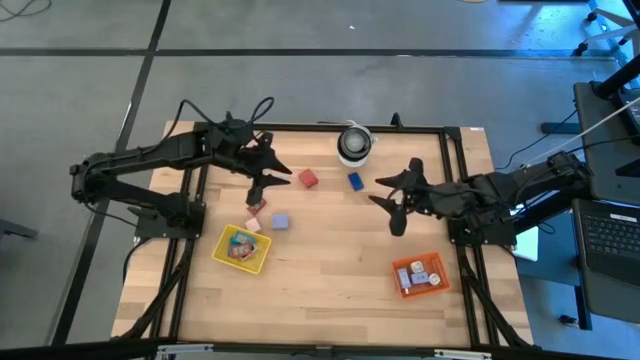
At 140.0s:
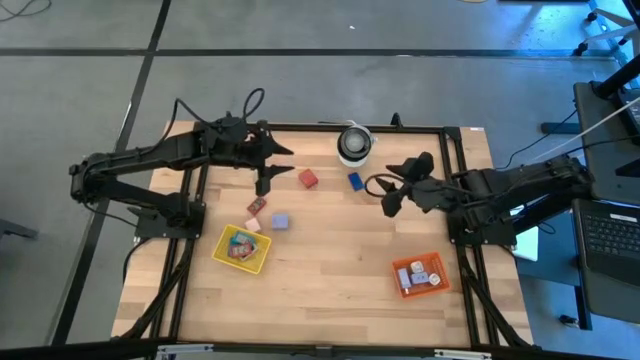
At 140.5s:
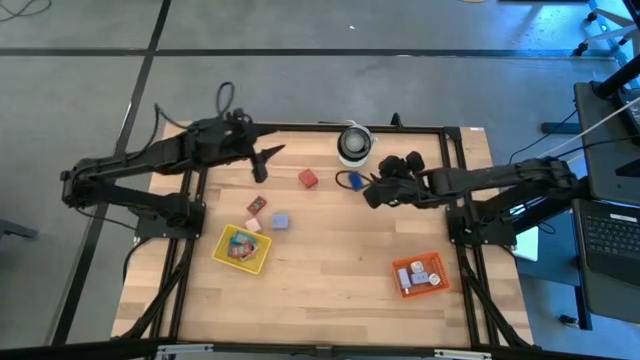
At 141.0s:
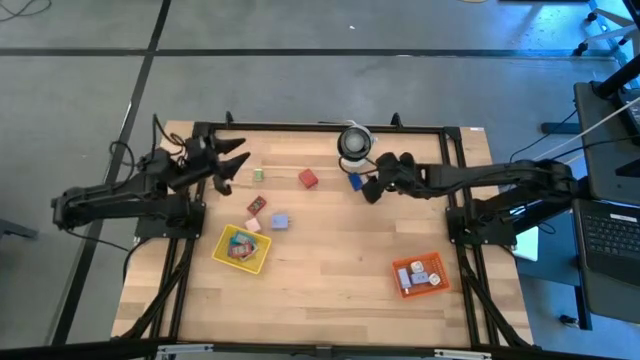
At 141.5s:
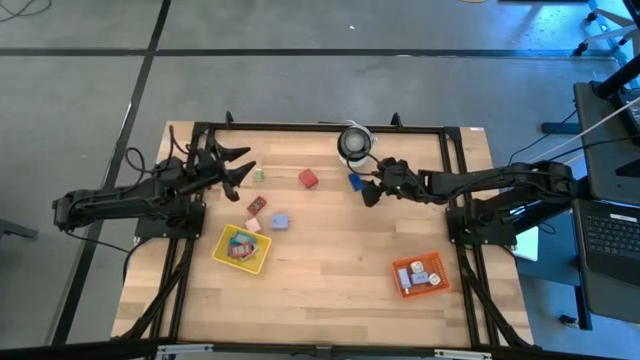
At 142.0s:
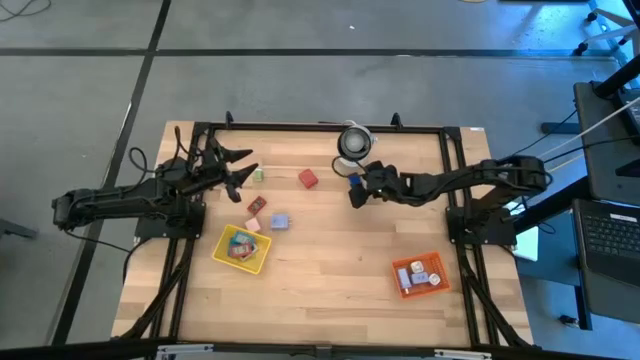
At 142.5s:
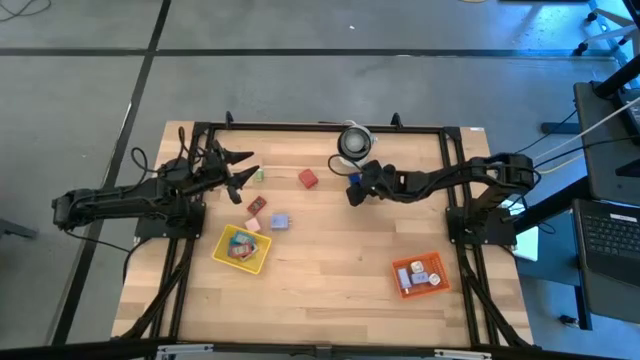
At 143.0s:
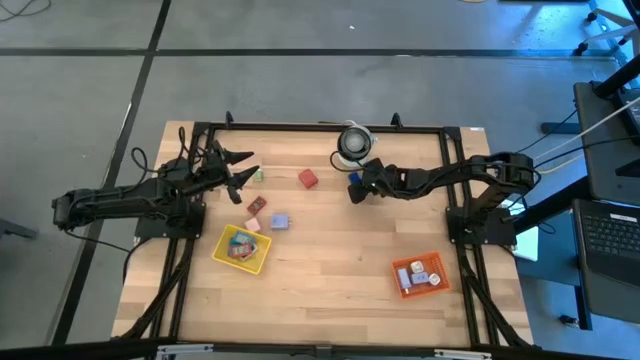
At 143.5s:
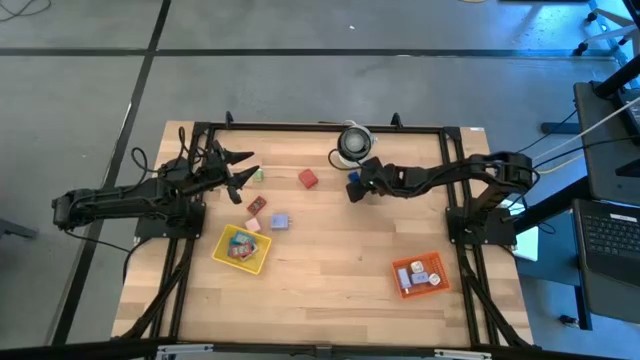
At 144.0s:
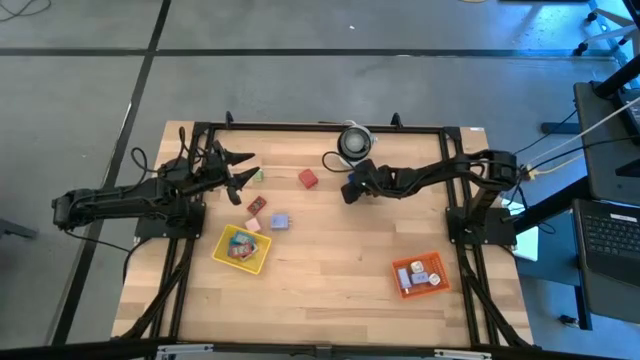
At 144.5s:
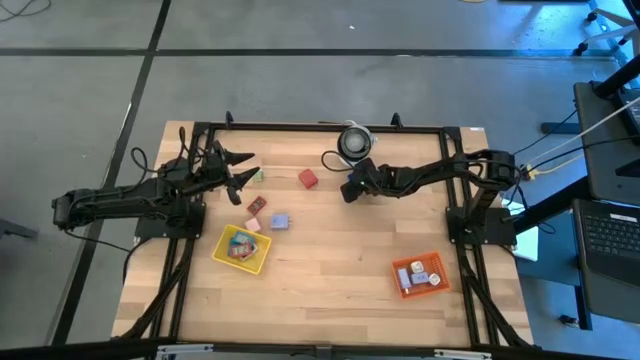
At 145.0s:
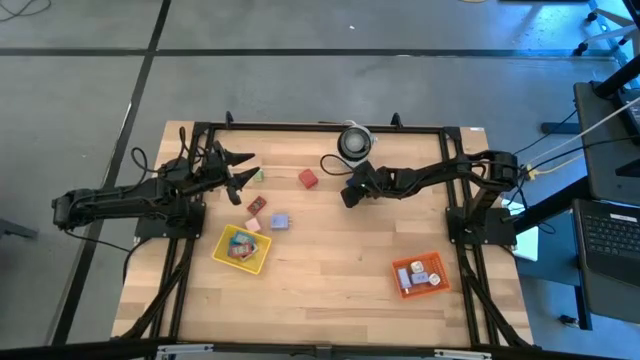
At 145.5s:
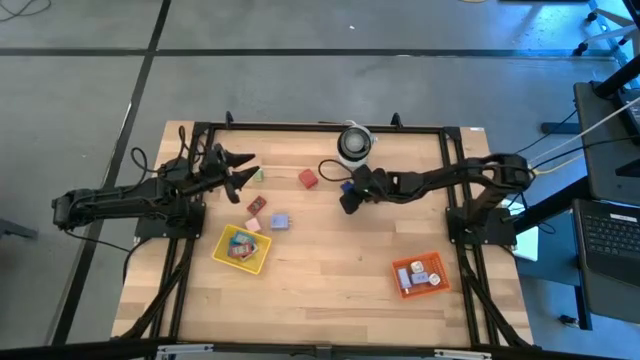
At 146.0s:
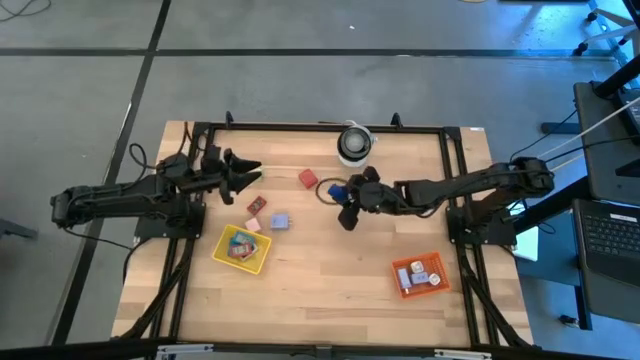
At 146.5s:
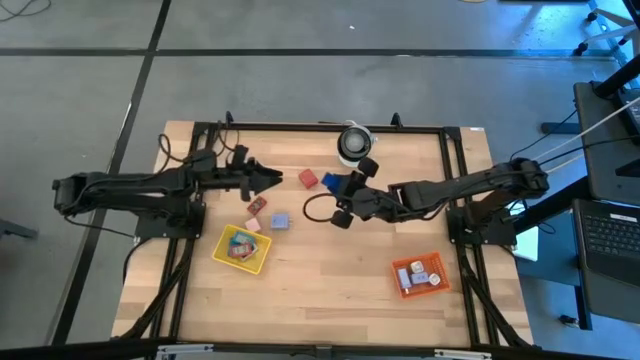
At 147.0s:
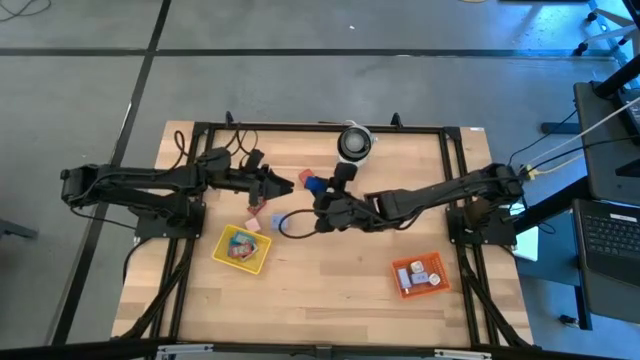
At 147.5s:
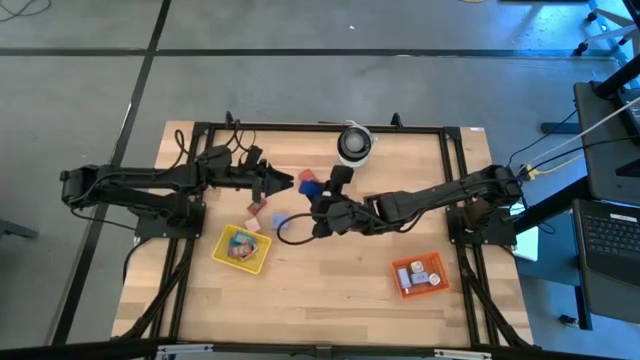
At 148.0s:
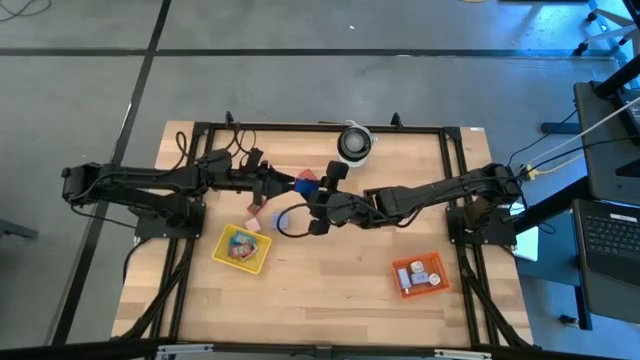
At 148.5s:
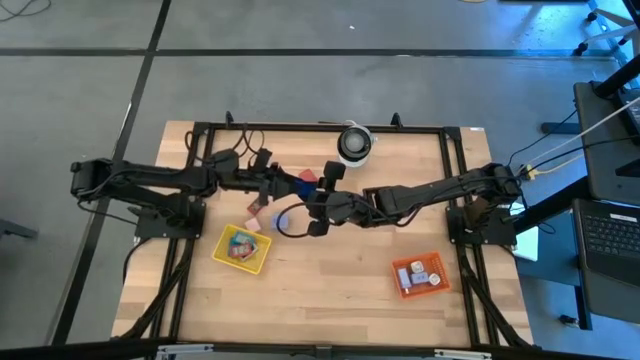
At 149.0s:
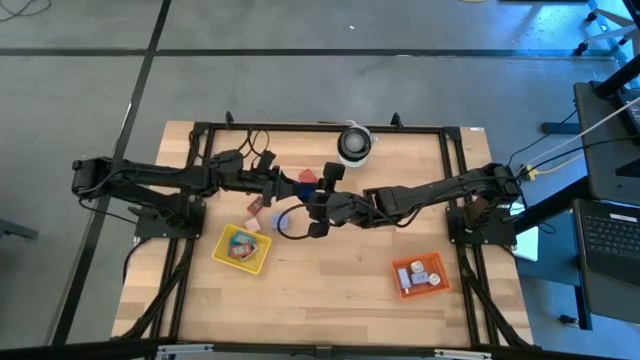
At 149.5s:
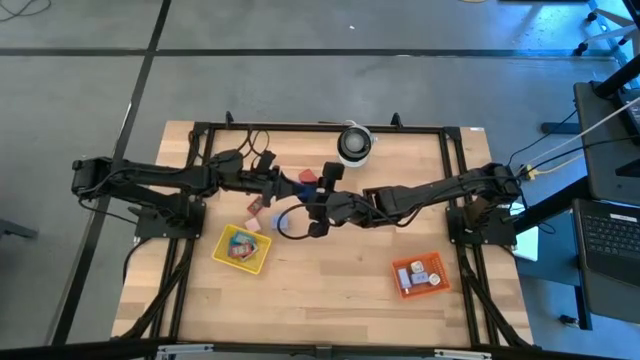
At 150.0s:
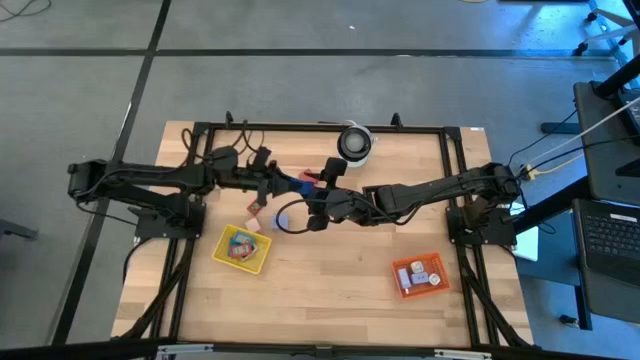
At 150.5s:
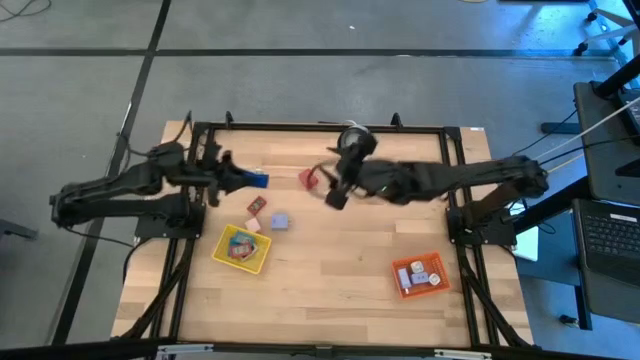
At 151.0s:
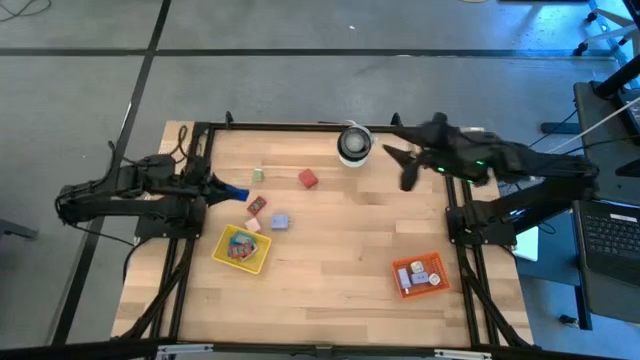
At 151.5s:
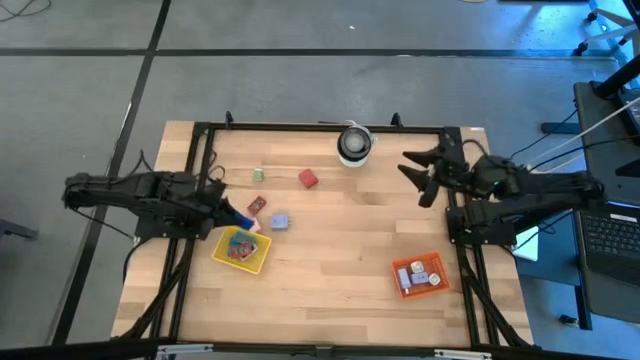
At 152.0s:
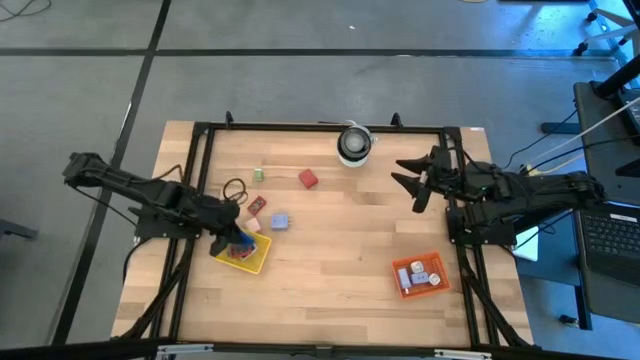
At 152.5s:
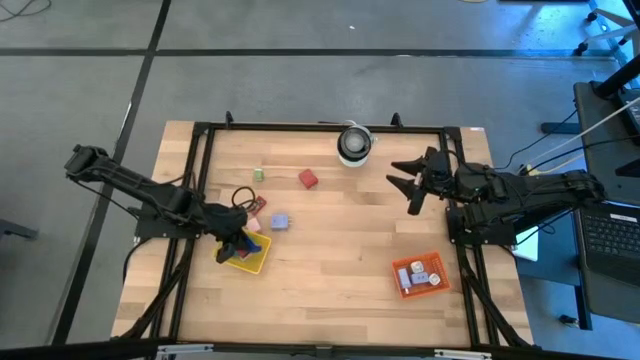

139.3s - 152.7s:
Task: Pick & Place Office items
Put the blue digital timer into the yellow bin
